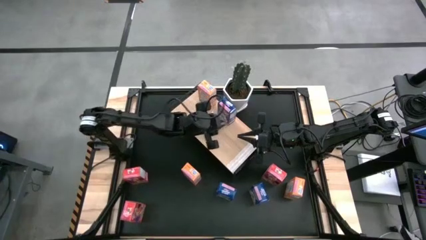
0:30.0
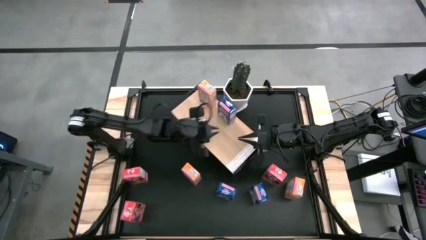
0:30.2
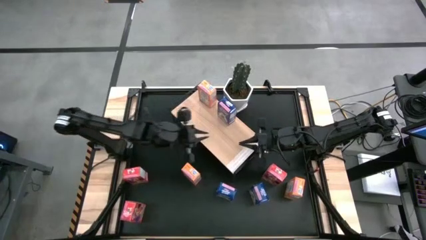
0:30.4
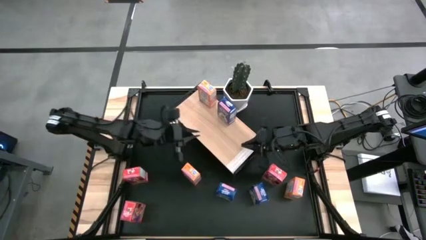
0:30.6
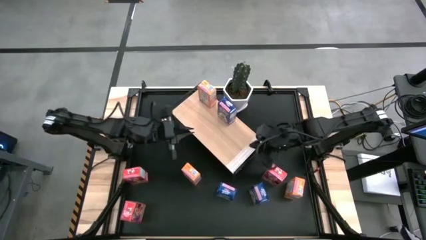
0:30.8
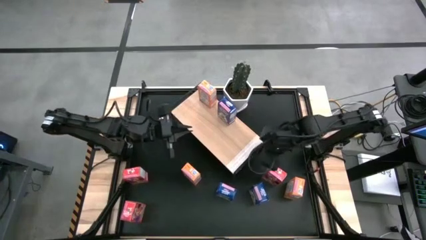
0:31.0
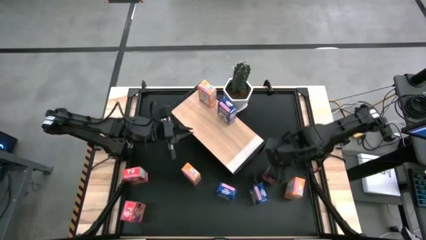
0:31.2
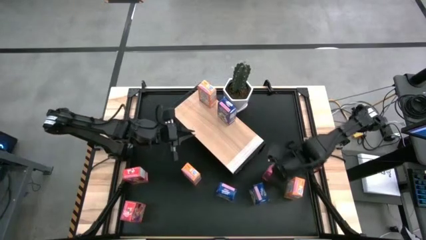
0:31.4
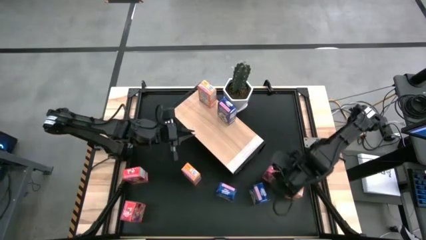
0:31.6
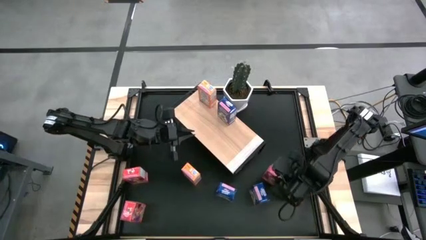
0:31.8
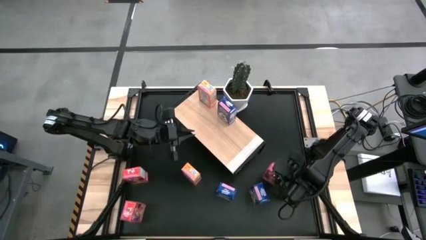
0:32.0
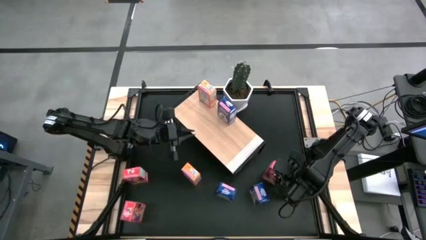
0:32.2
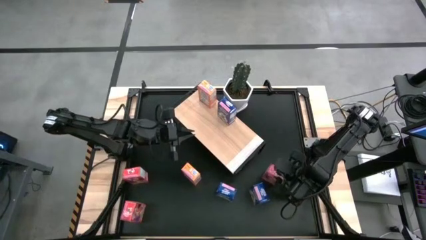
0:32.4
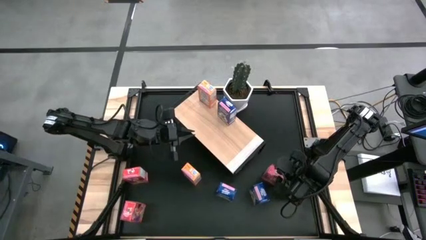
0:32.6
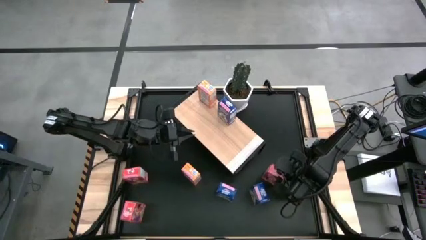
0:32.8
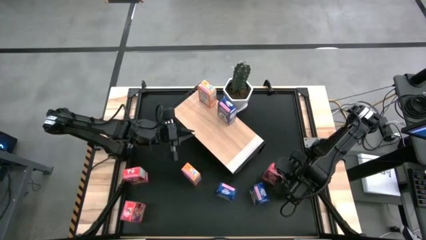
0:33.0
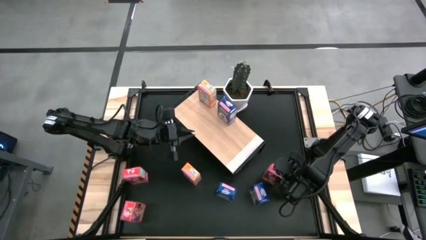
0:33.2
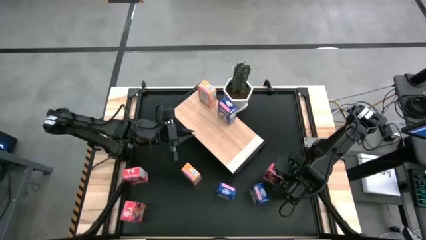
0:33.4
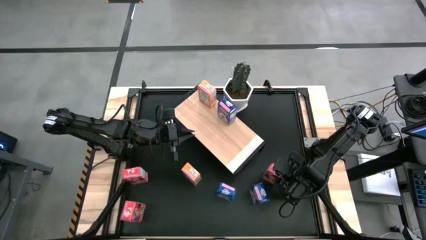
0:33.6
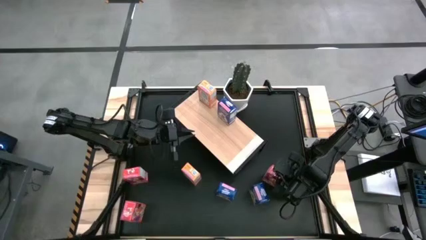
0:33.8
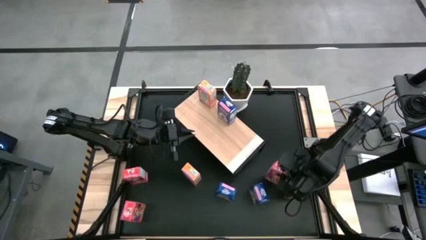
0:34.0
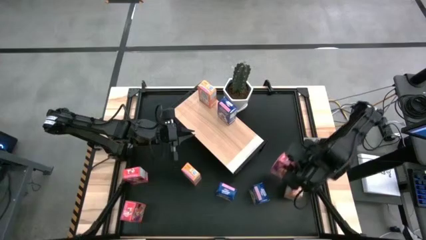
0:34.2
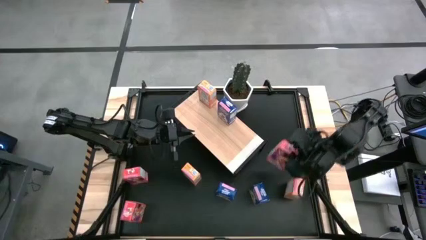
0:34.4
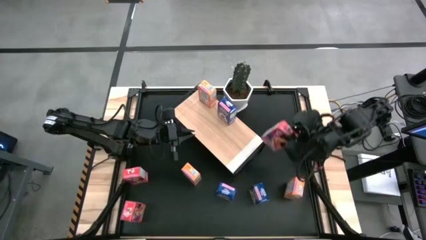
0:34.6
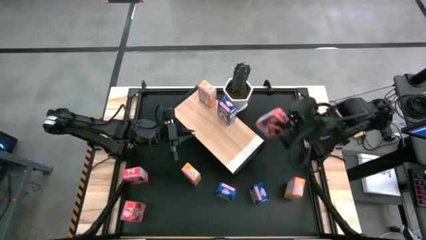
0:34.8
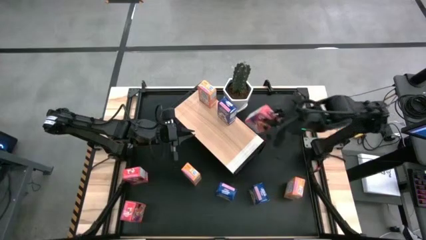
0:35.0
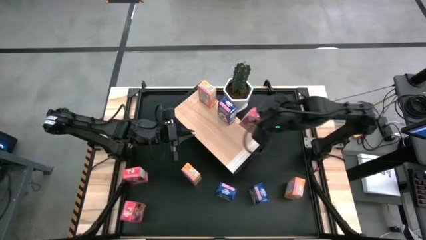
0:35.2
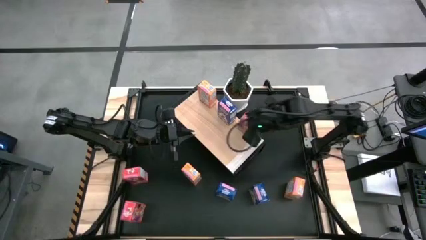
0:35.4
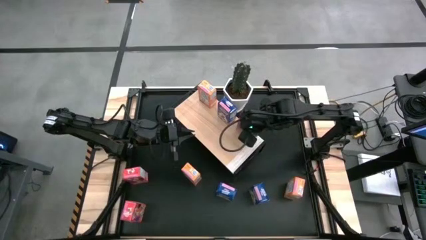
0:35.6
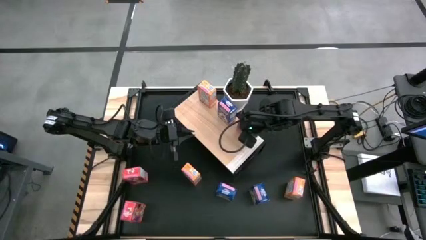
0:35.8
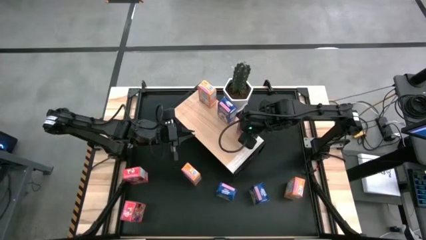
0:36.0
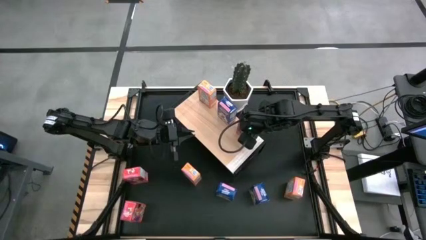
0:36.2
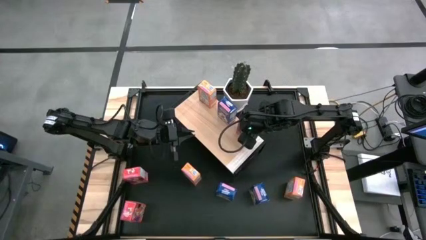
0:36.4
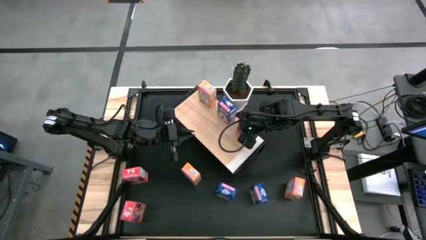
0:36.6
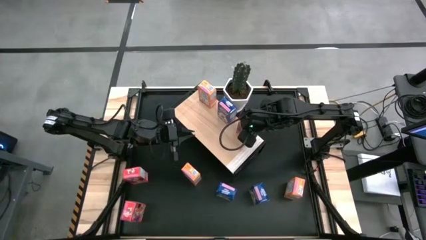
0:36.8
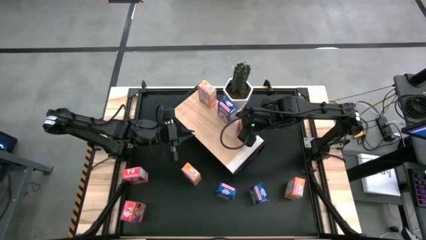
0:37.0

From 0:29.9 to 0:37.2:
Task: Stack cereal on shelf
Put the right red cereal box on the shelf

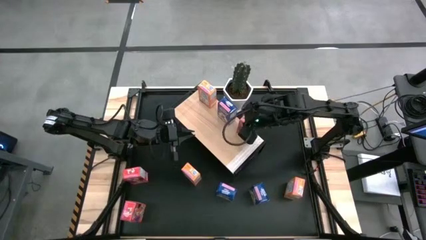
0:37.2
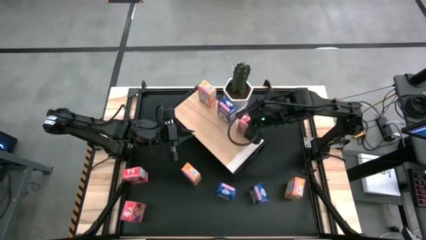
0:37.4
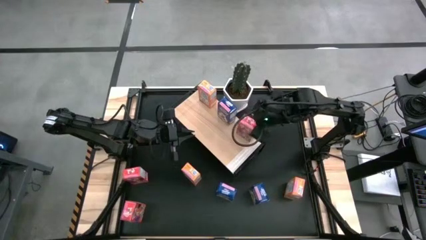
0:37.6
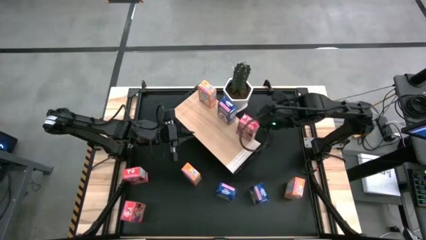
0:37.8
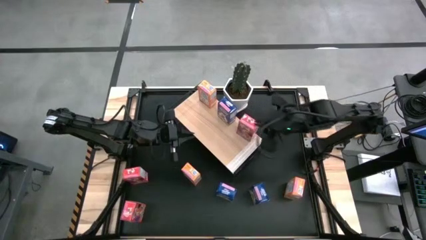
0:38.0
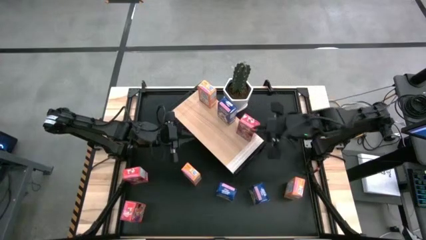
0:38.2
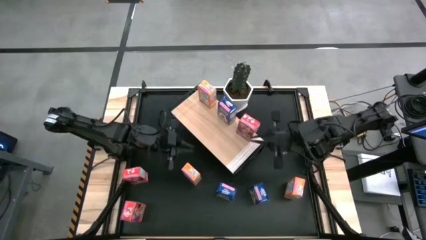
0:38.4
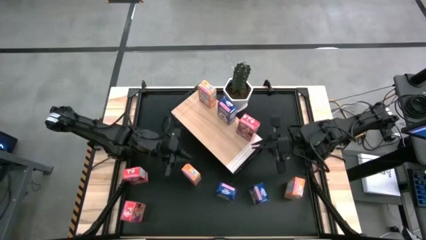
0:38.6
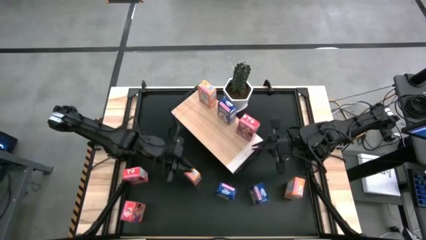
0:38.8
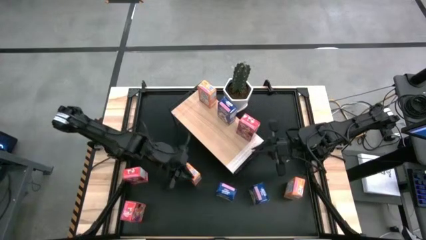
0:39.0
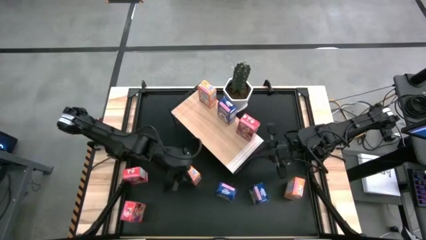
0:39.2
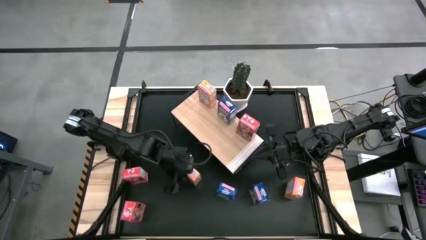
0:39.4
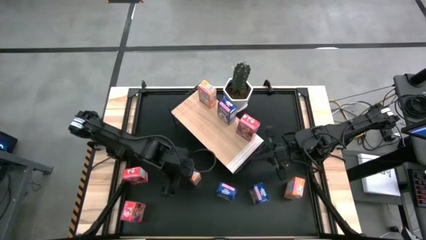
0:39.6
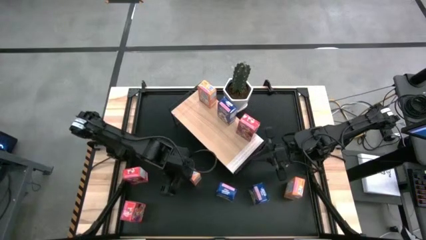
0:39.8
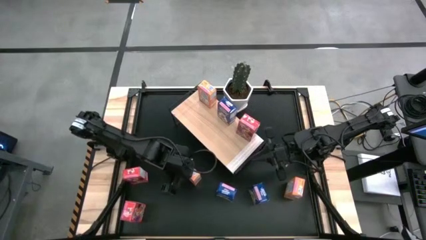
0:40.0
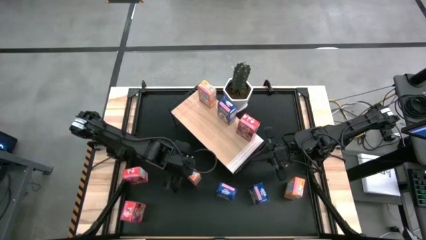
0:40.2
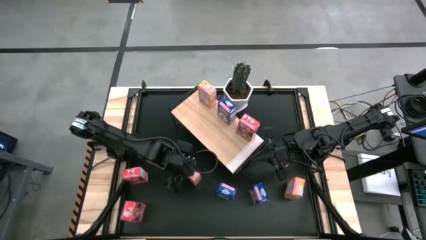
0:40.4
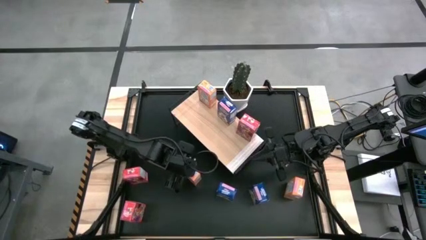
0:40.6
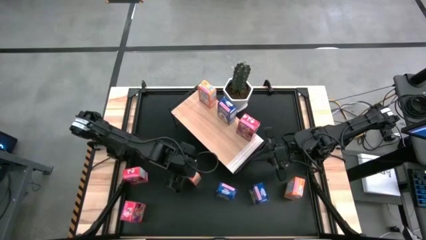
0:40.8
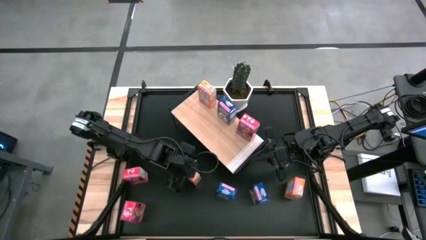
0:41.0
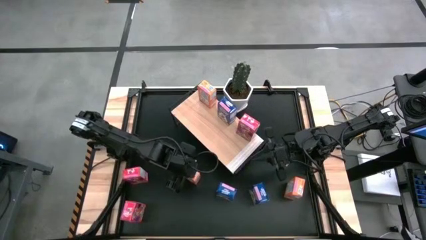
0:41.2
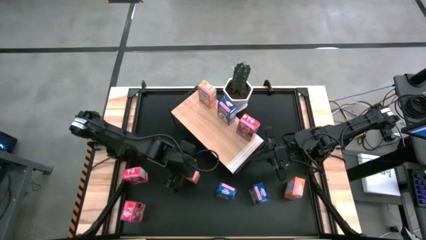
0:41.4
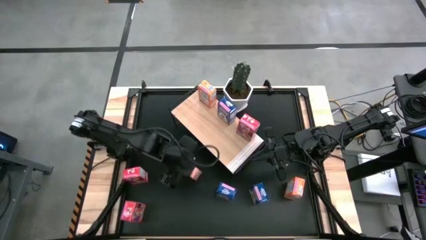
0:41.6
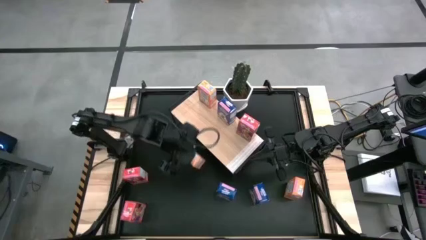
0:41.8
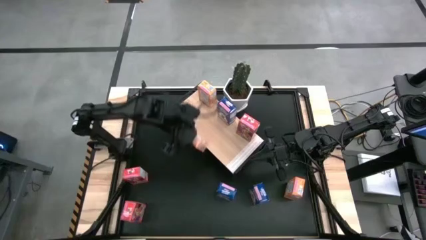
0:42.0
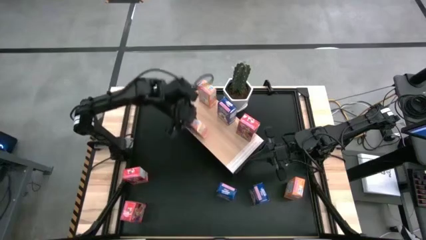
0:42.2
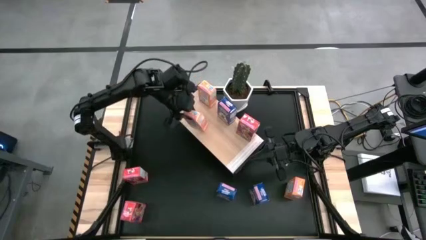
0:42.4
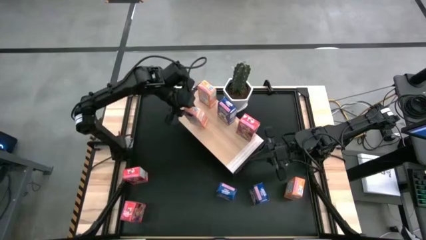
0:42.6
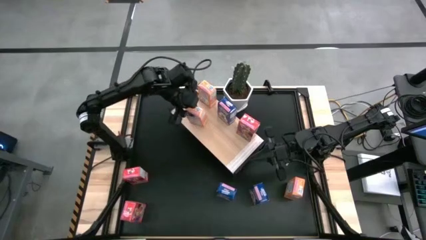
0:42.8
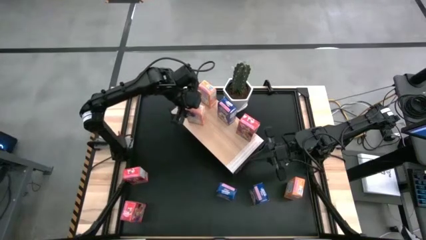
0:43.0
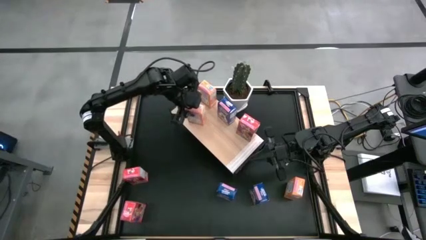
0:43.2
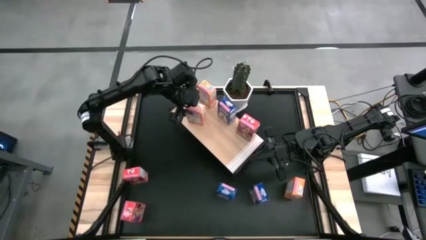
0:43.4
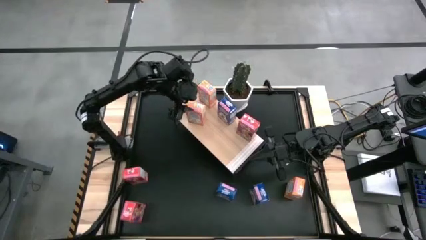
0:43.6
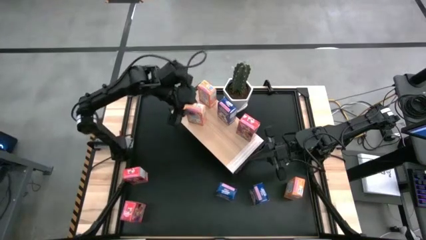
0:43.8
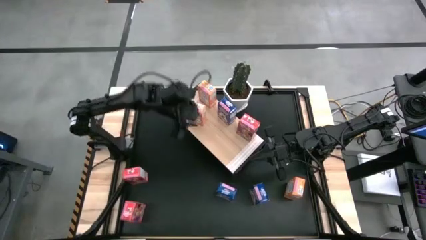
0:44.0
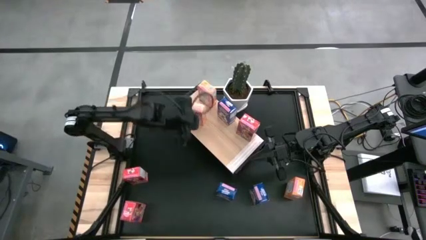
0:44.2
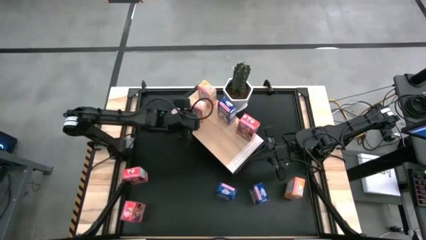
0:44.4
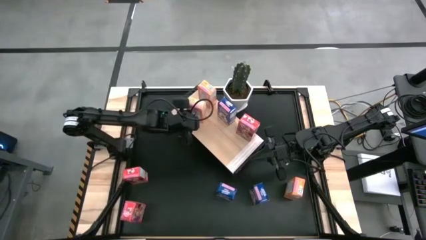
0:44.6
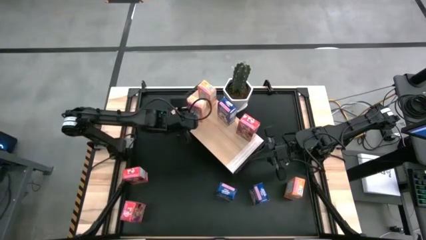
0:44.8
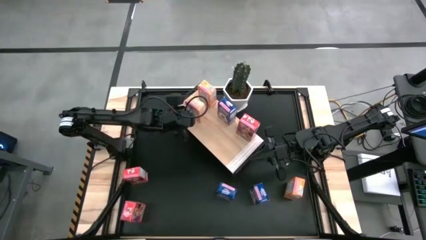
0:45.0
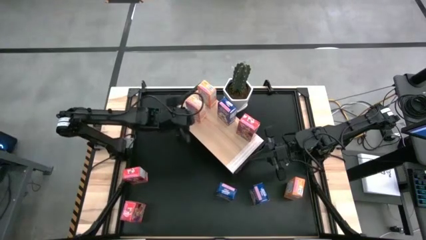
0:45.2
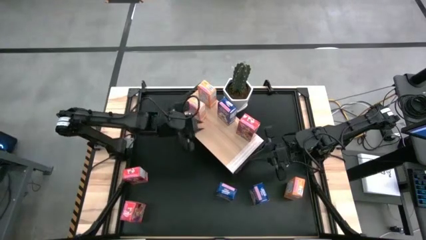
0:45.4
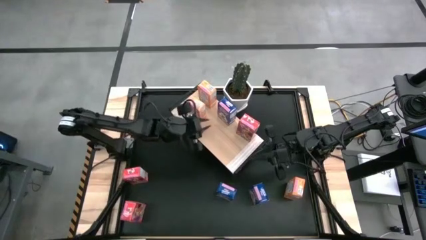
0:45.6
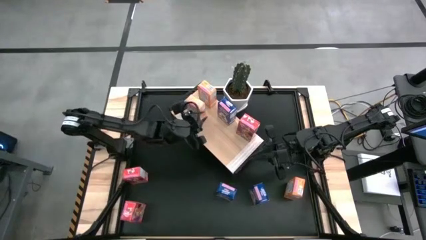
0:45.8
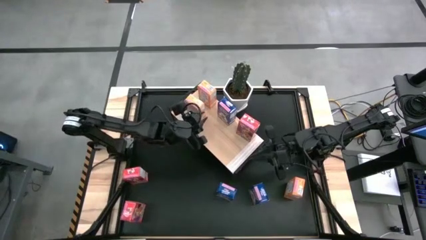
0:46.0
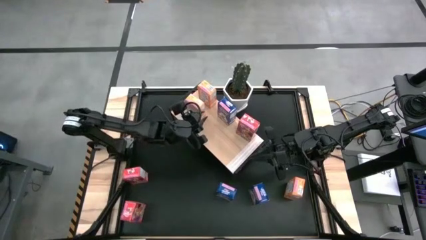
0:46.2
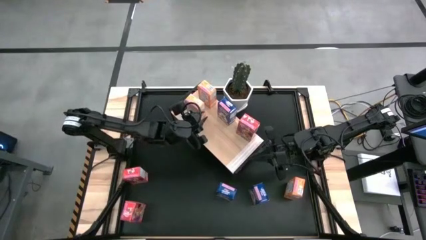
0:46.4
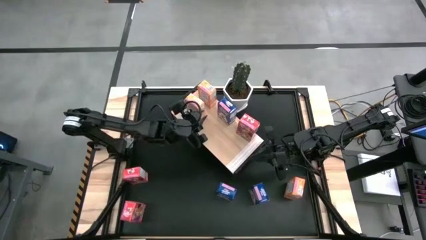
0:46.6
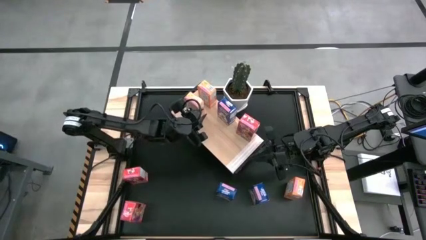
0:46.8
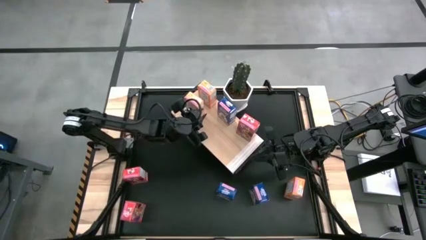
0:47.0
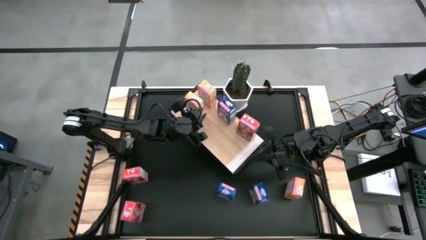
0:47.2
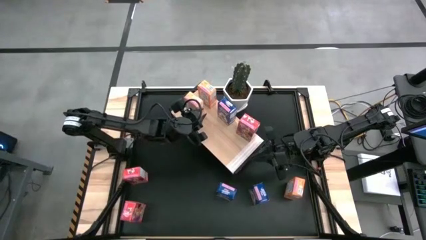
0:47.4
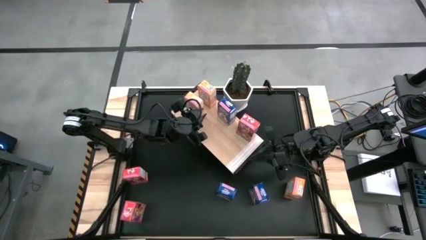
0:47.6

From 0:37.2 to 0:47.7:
Put the left orange cereal box on the shelf aligned with the other orange cereal box
